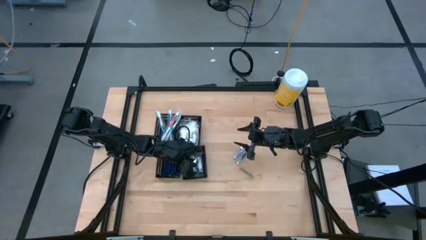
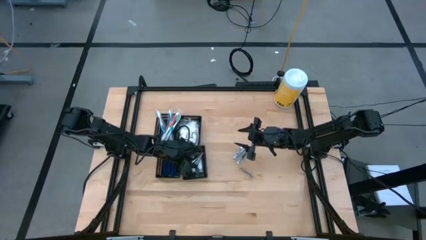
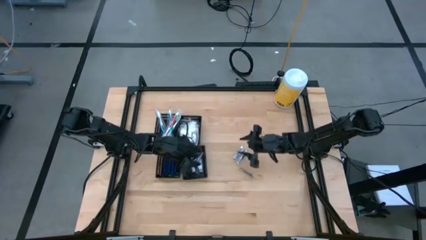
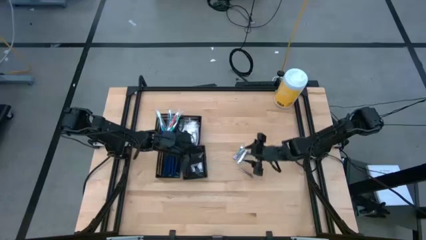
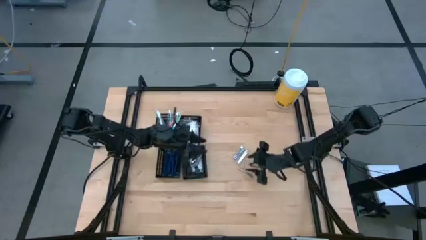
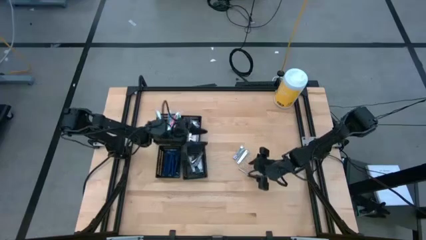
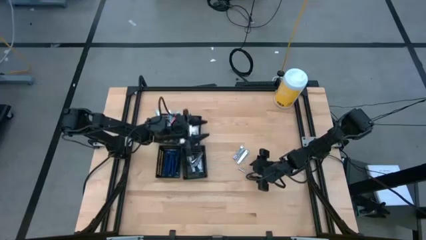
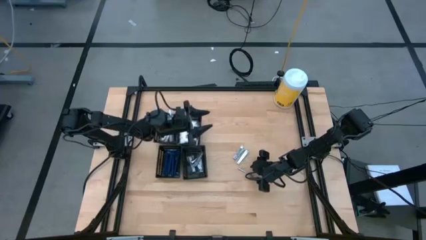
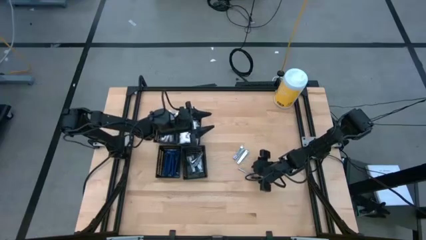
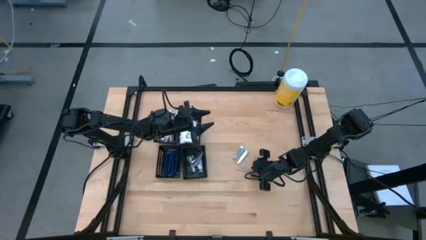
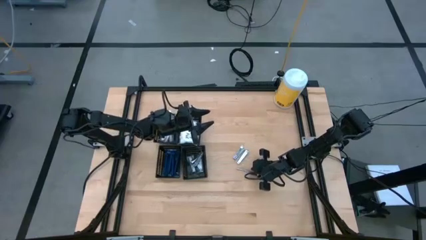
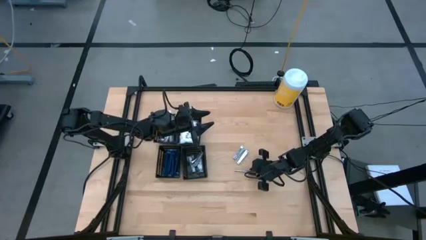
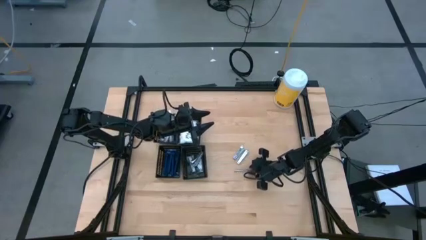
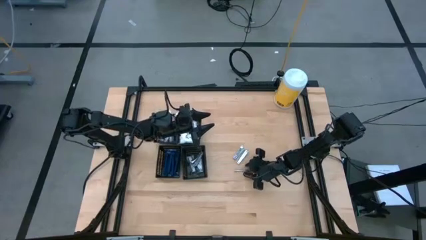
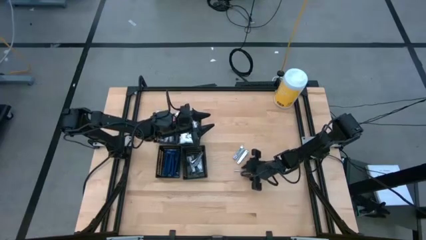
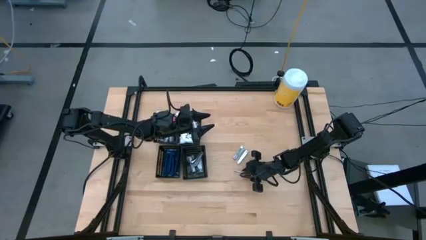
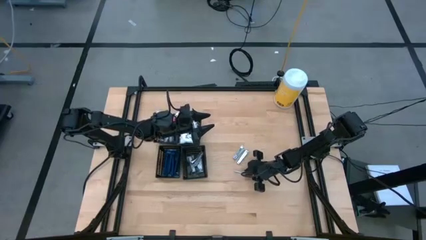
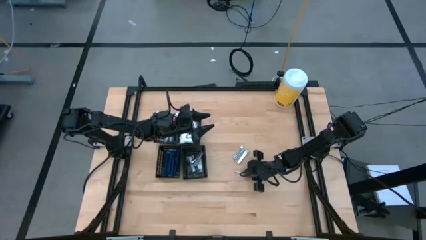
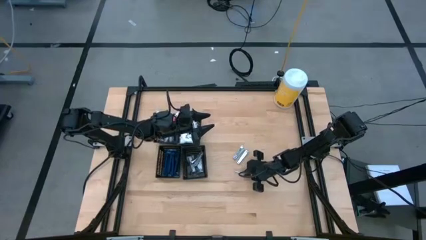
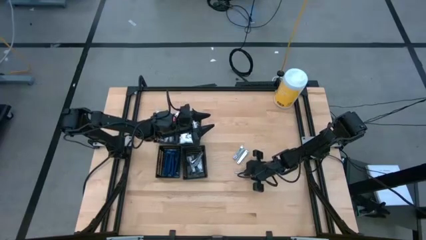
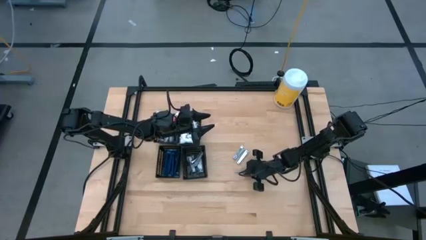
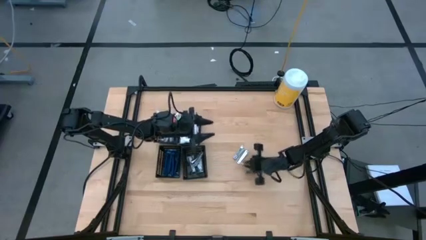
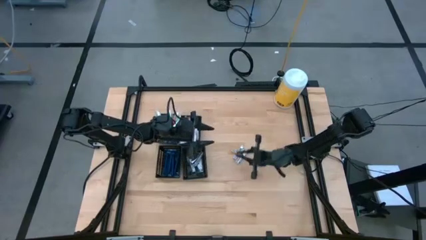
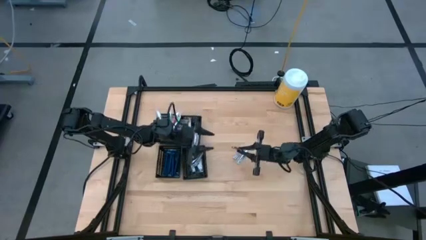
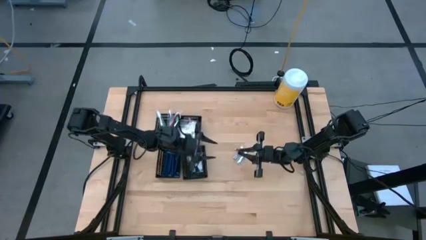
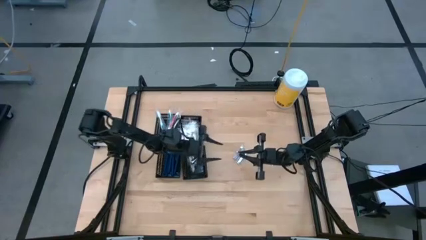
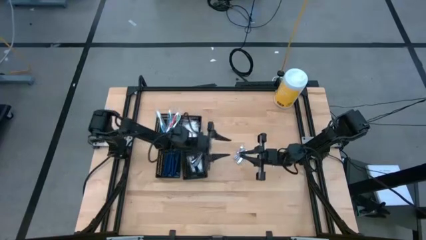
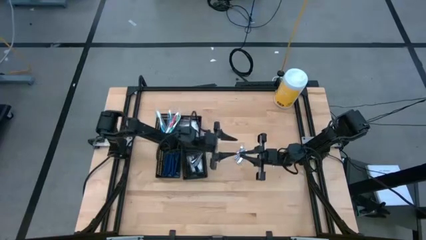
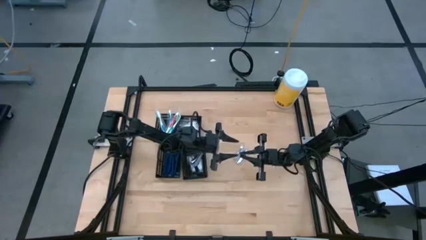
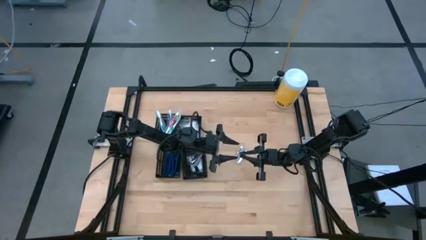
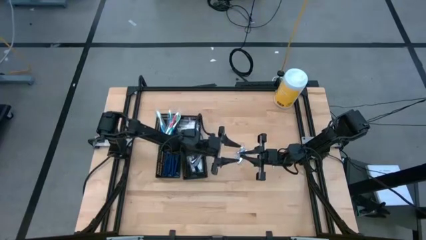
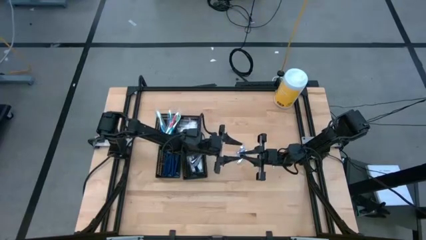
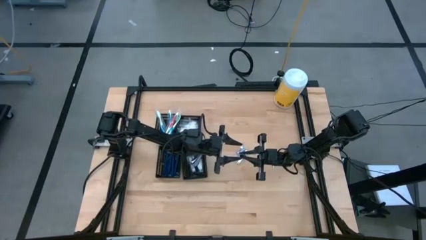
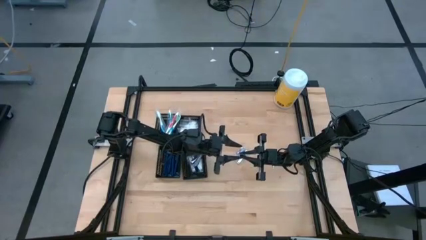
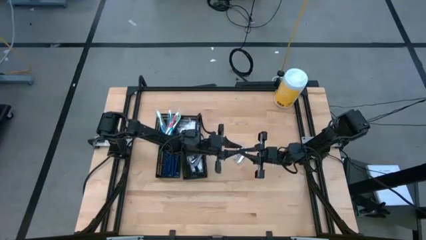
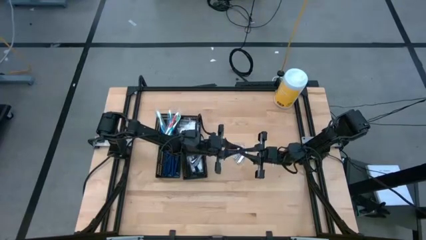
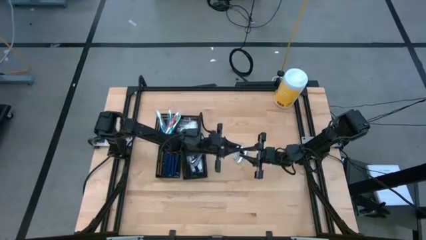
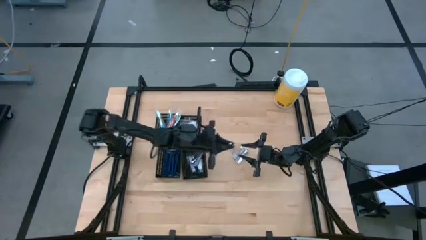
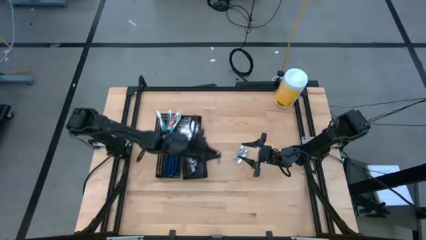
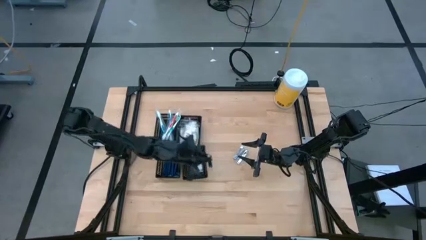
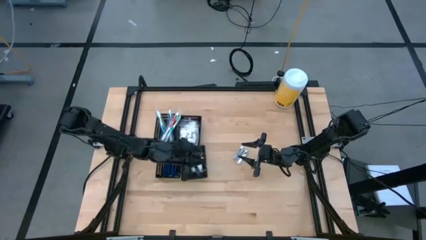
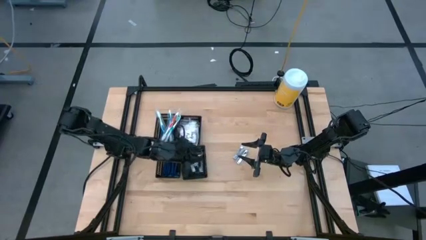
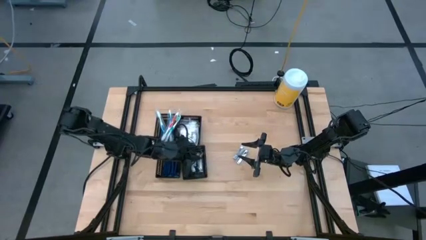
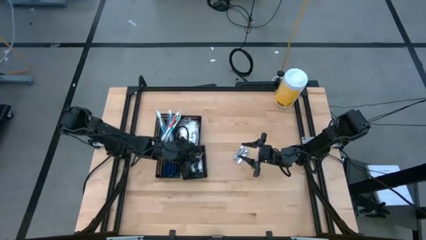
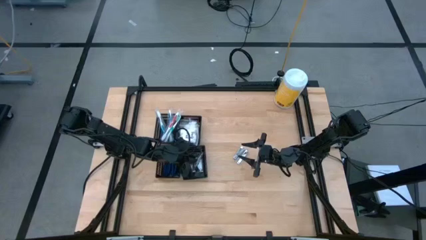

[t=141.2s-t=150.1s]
Task: Pick & Place Travel size toiletries
Put the nail cutter into the bottom right black bin

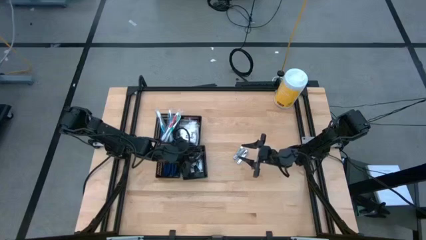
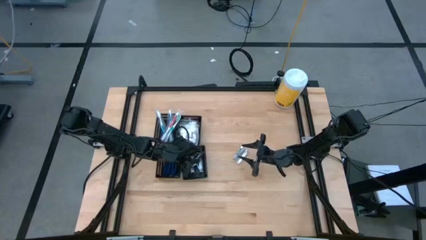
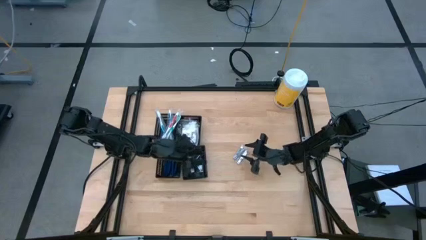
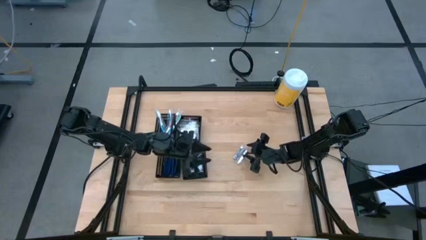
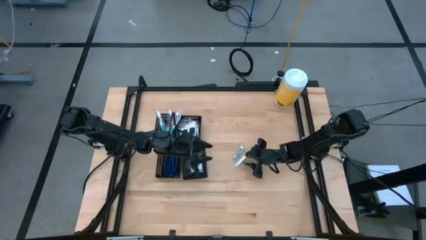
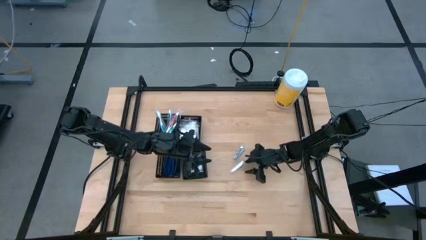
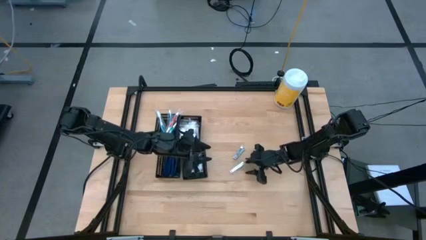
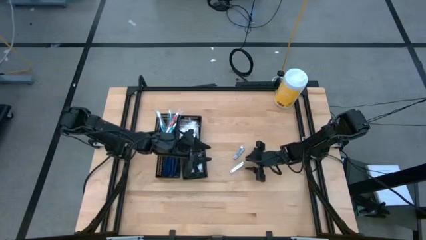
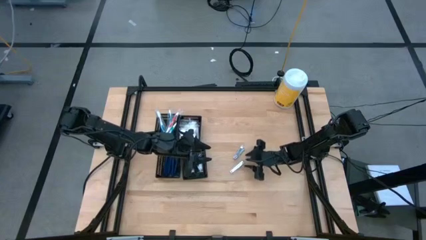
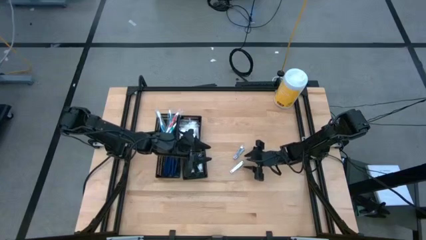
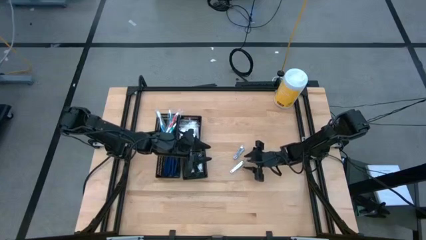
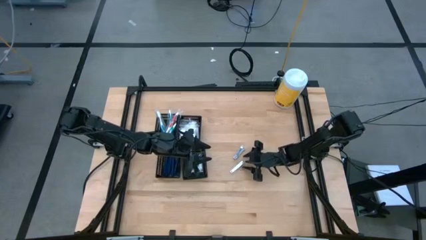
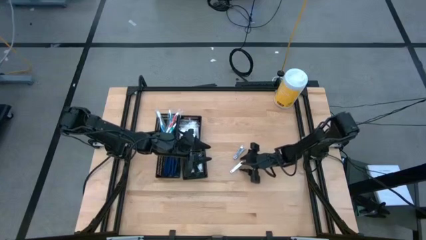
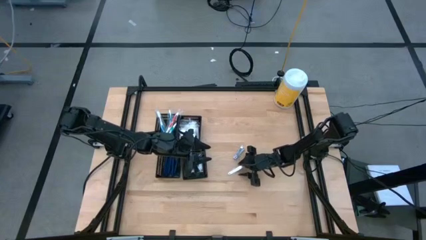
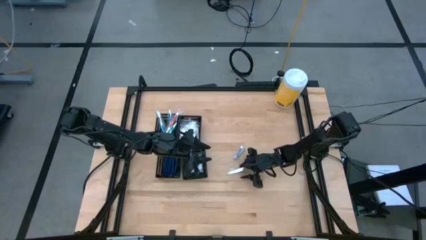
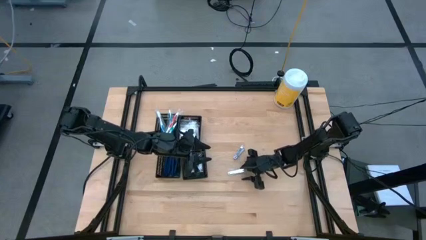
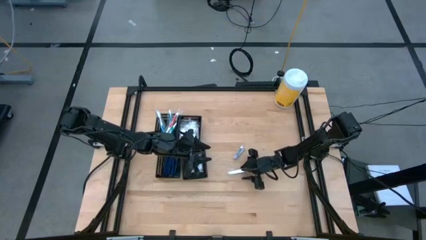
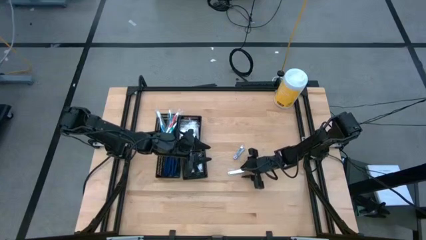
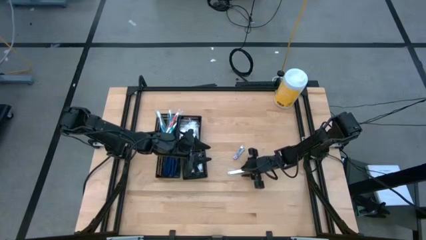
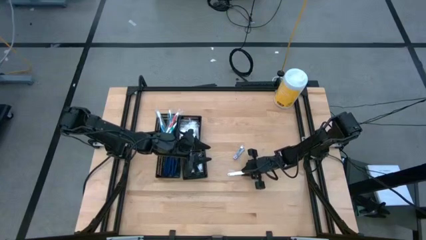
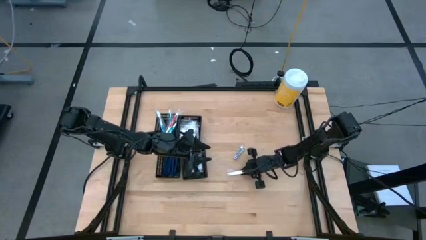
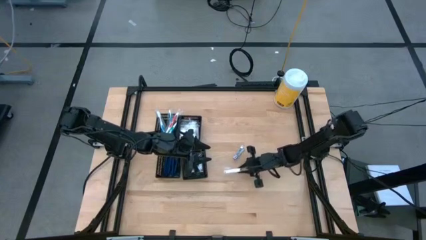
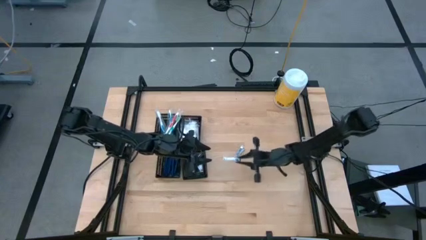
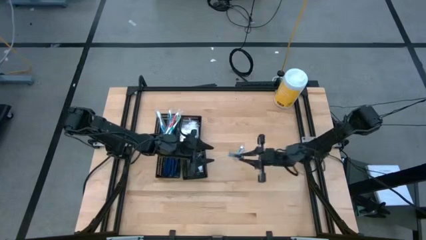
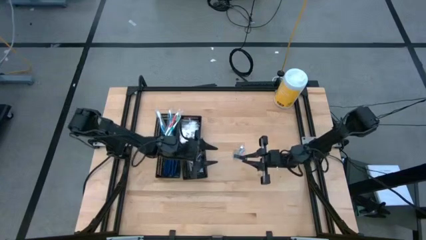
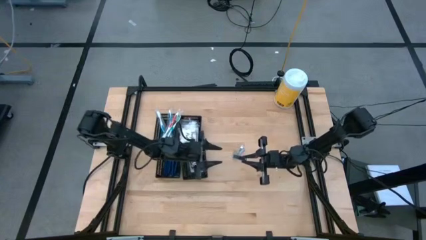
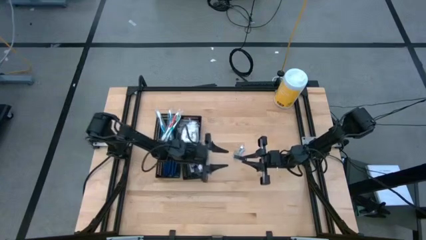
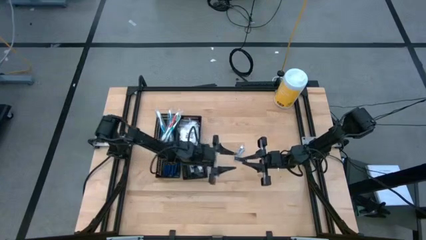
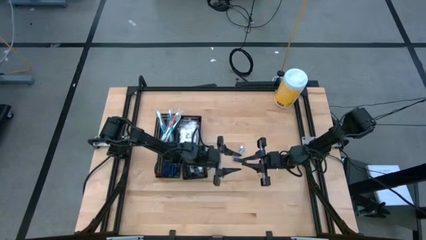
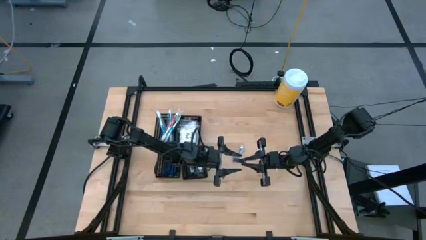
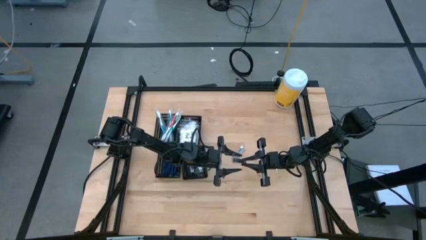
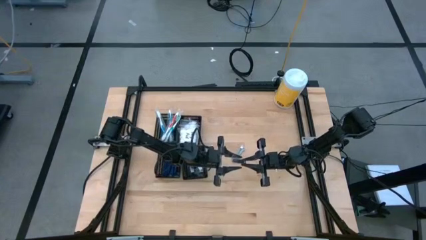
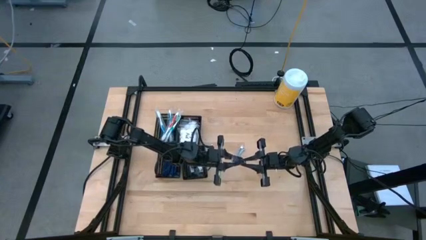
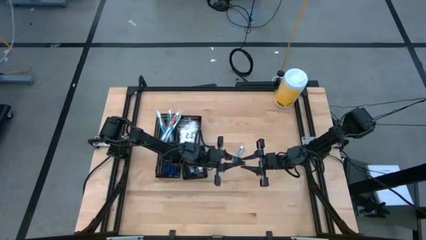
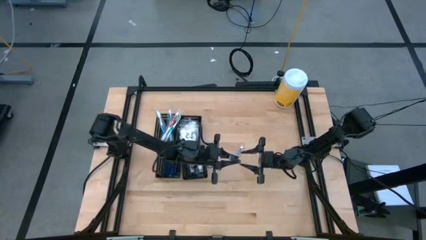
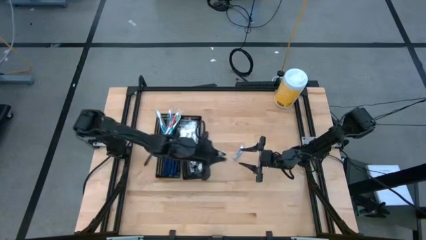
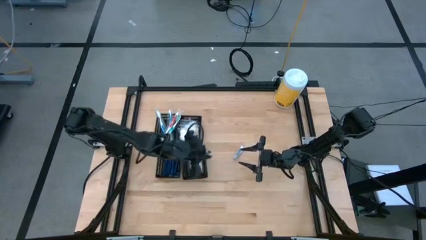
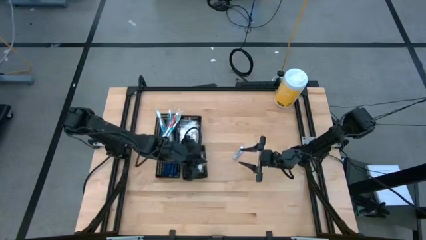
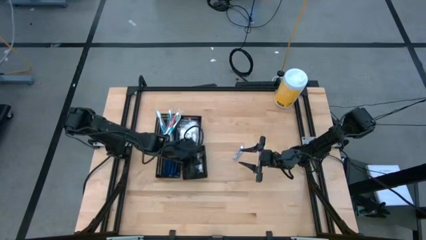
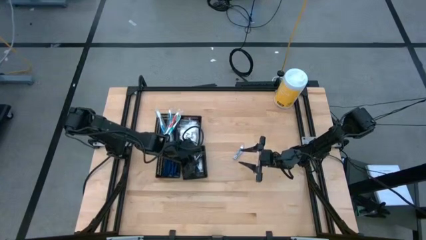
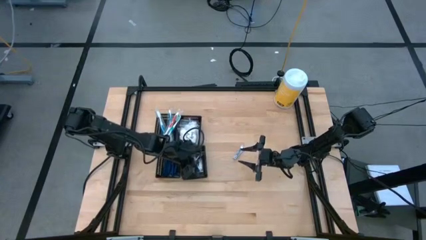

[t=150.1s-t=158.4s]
Put the nail cutter into the bottom right black bin
